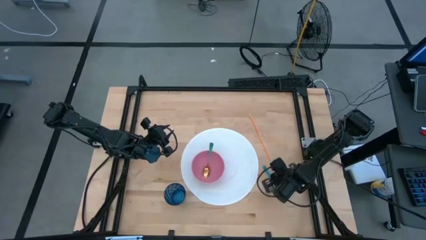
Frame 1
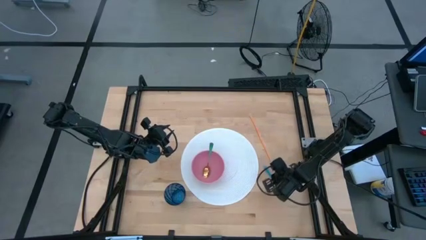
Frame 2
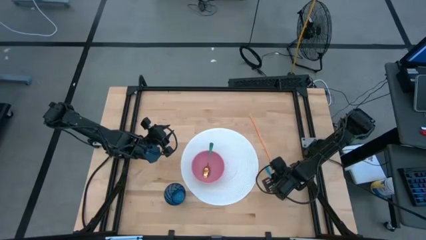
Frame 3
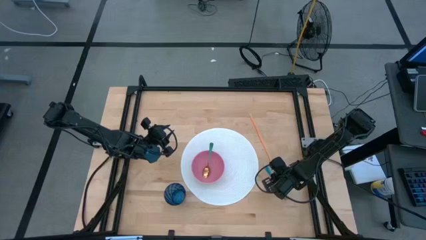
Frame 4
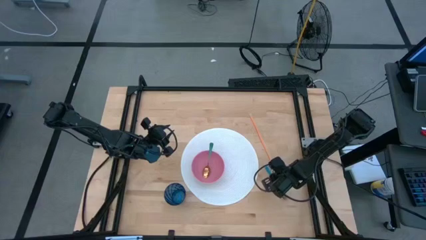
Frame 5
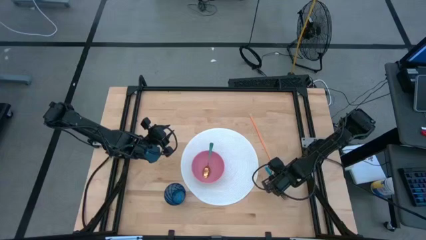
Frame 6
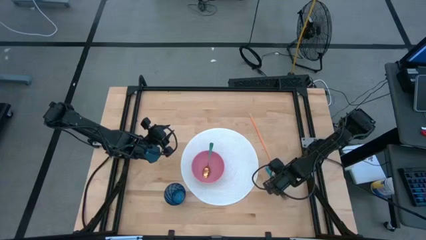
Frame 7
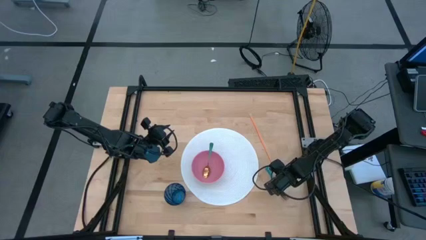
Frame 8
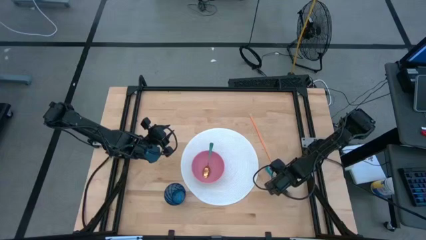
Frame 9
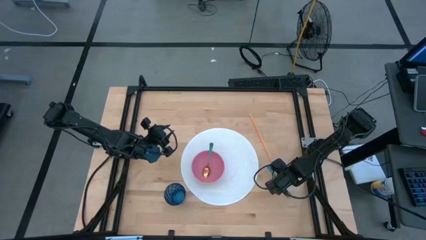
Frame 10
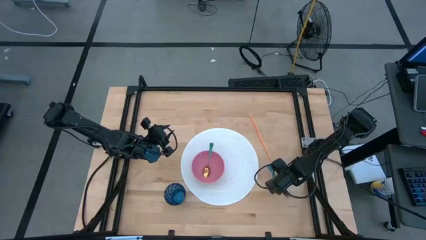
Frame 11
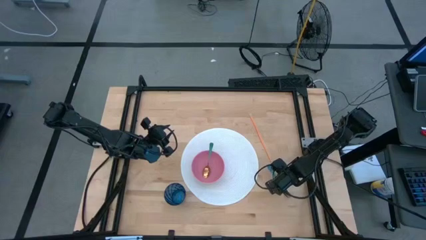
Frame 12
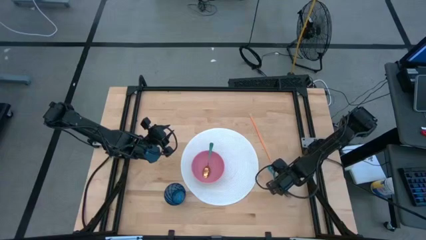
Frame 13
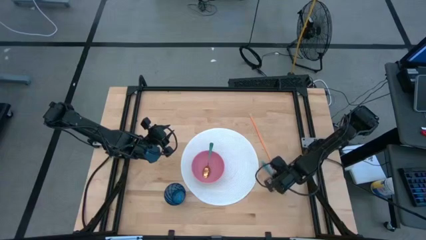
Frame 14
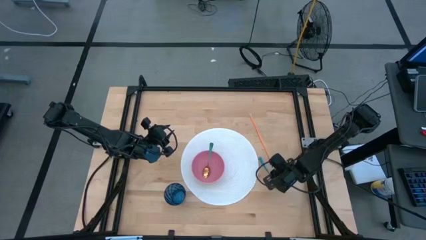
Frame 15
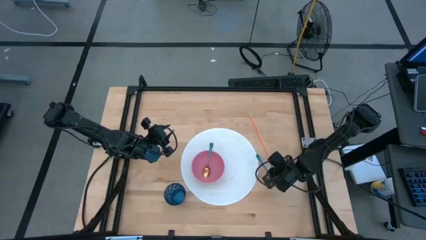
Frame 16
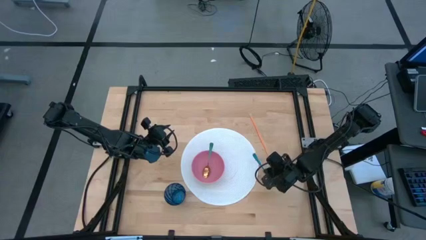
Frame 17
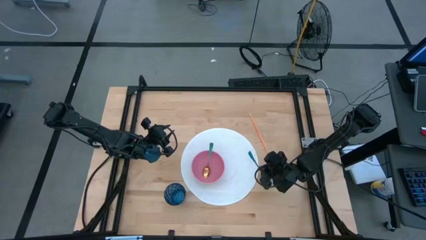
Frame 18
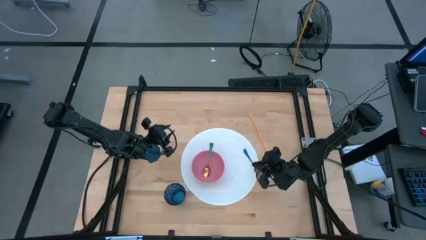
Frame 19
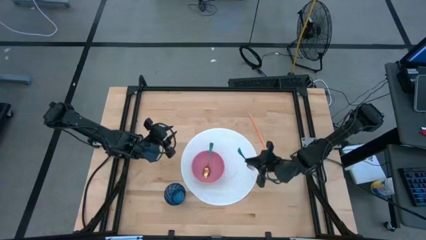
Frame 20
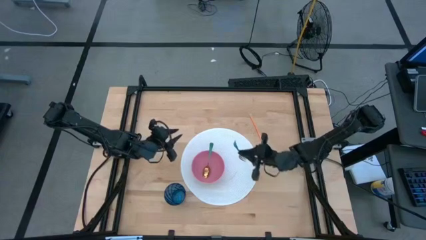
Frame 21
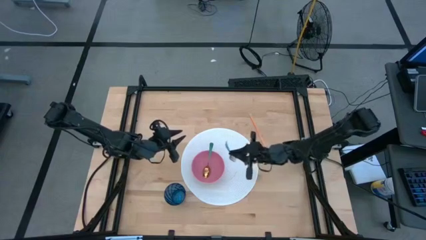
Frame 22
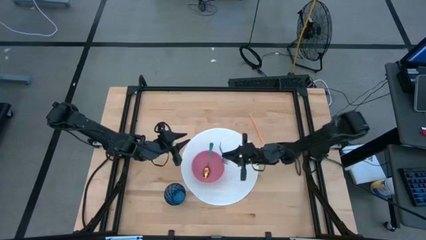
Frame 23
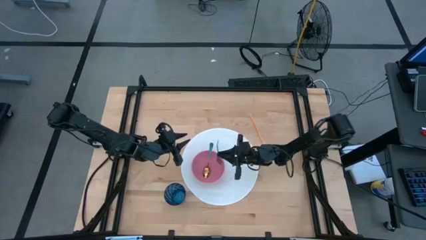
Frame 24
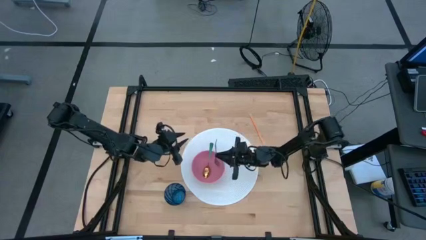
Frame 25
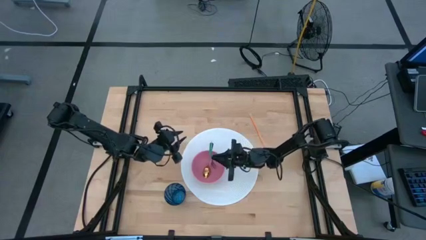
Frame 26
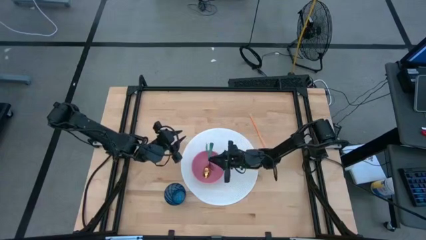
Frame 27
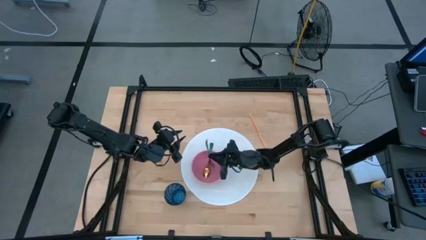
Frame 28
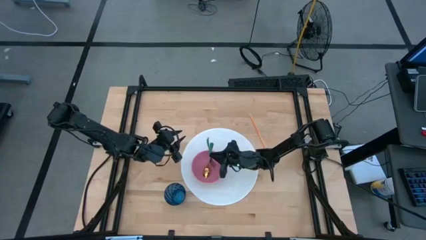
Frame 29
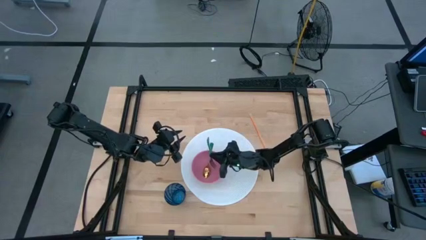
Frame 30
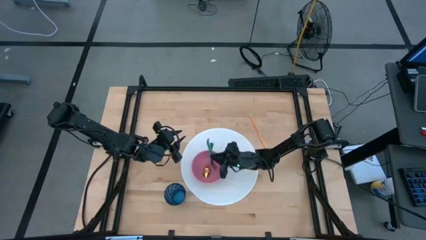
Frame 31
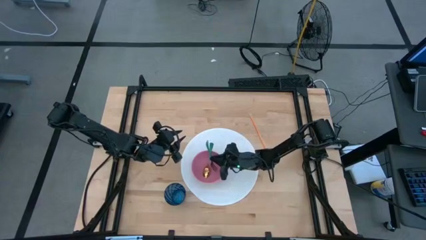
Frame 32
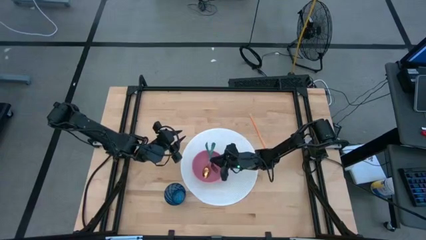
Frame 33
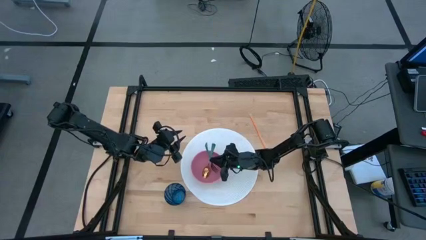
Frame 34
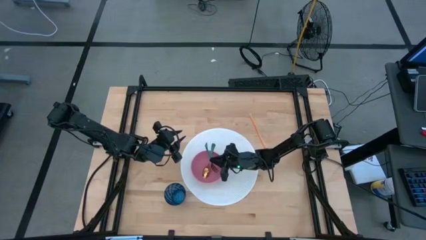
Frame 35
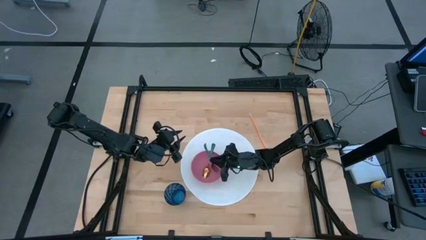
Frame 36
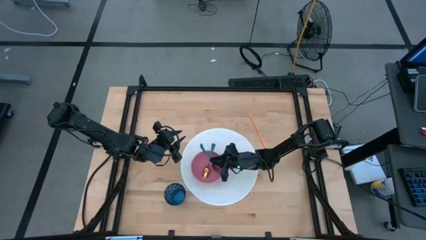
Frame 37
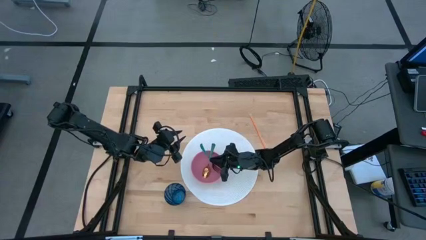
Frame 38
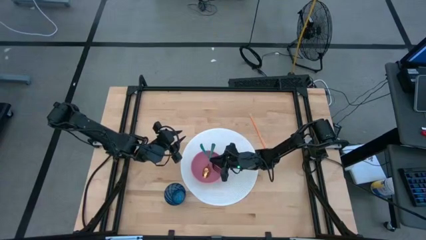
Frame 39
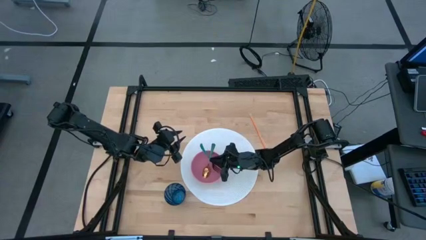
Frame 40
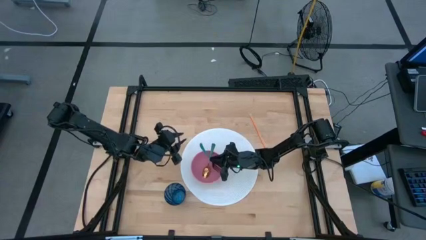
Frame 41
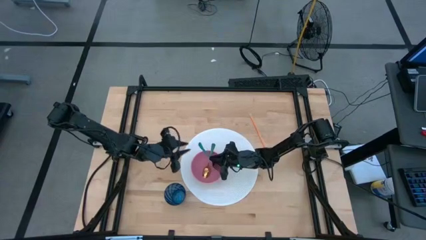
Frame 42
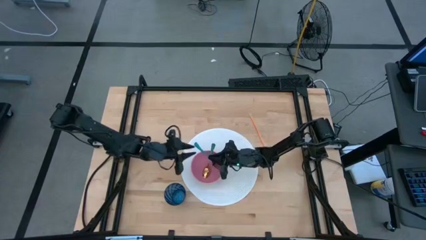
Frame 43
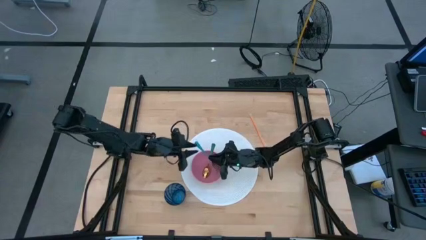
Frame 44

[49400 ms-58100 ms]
Task: Pick & Place Utensil
Put the blue fork into the pink bowl

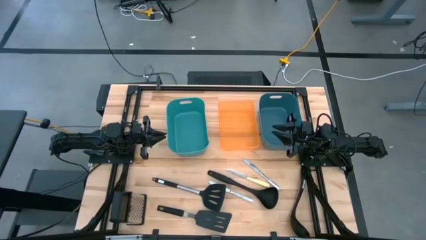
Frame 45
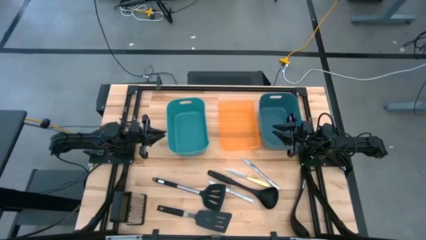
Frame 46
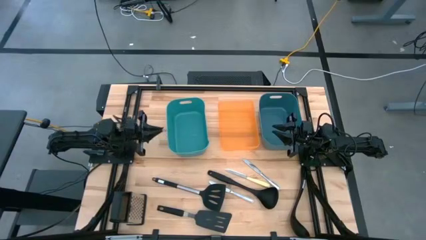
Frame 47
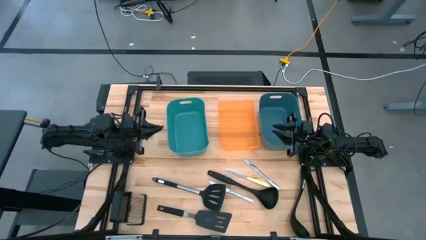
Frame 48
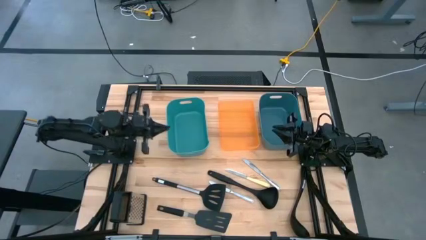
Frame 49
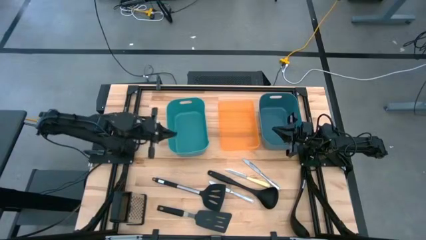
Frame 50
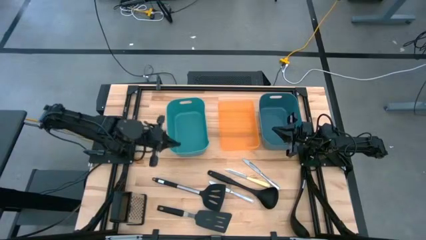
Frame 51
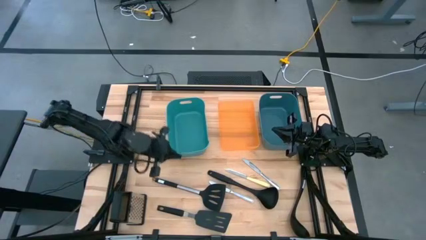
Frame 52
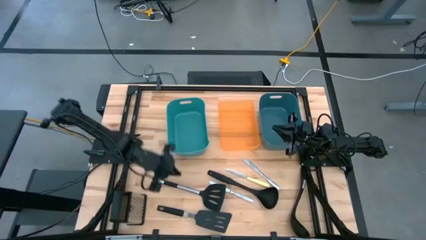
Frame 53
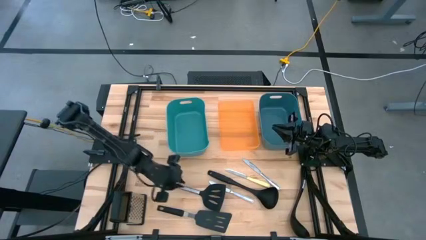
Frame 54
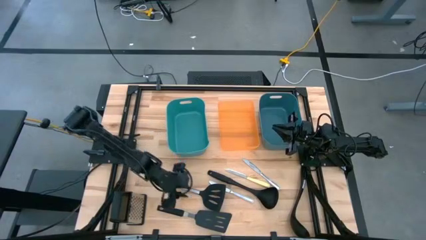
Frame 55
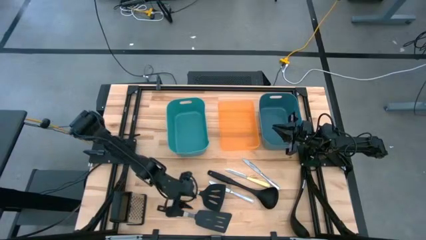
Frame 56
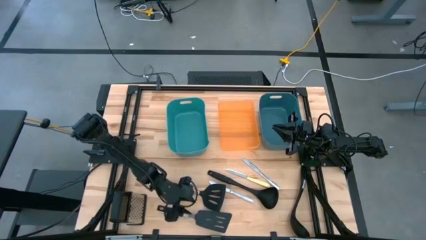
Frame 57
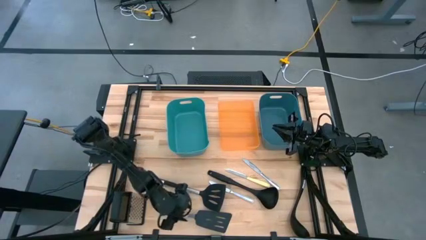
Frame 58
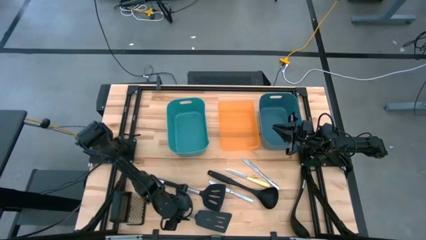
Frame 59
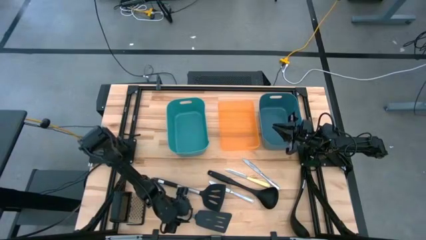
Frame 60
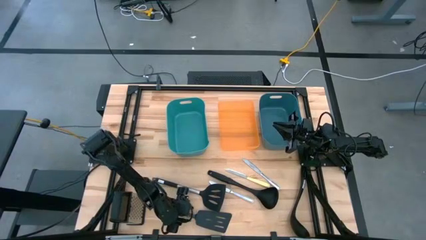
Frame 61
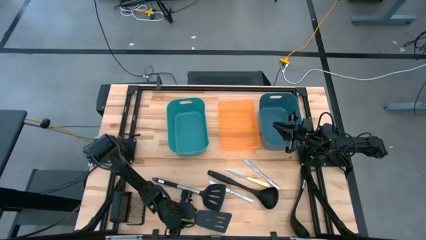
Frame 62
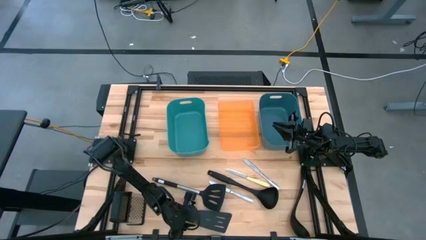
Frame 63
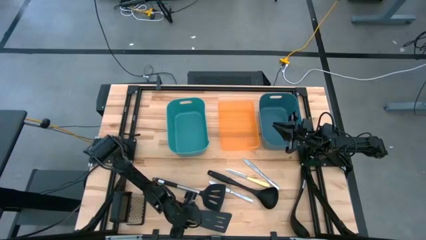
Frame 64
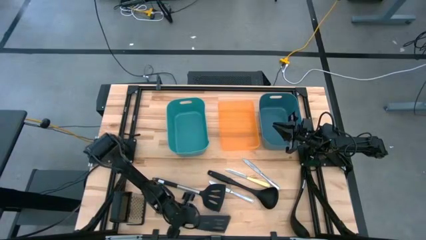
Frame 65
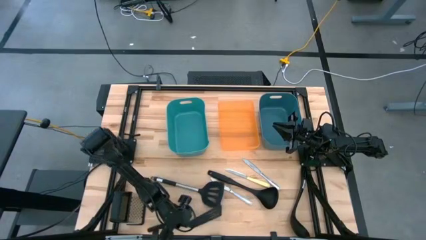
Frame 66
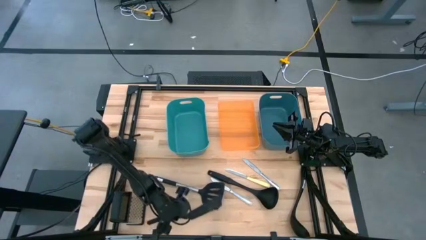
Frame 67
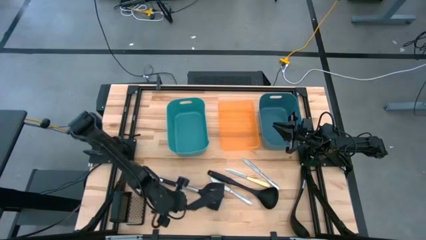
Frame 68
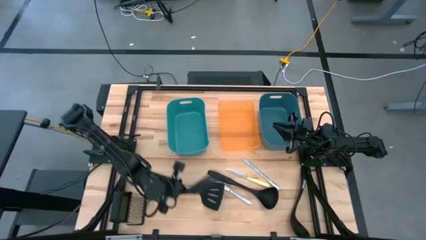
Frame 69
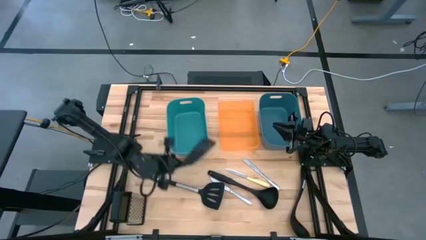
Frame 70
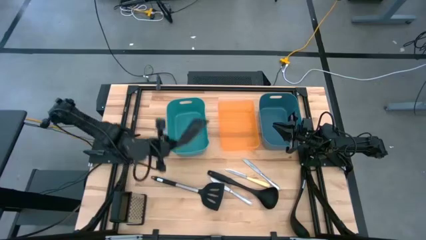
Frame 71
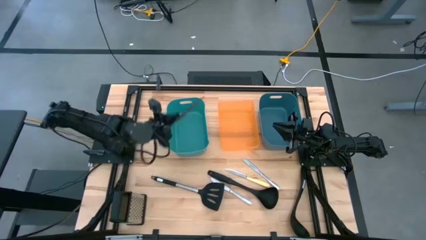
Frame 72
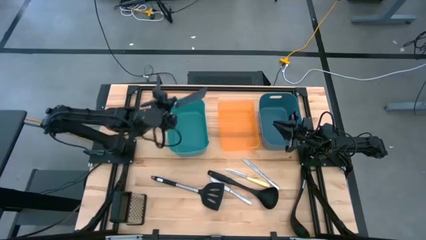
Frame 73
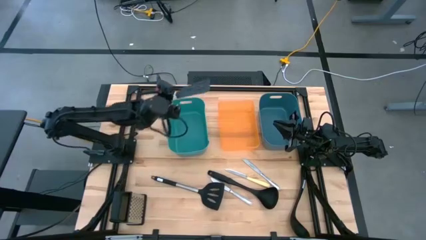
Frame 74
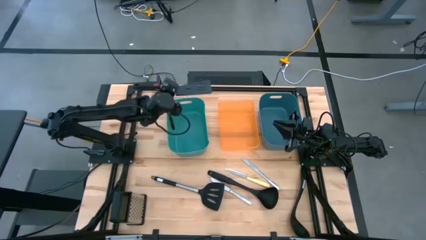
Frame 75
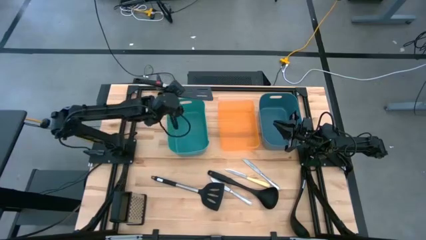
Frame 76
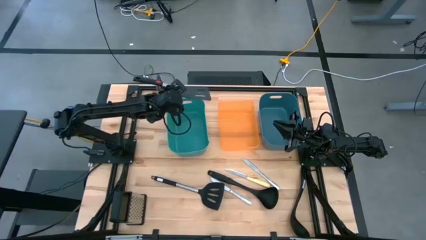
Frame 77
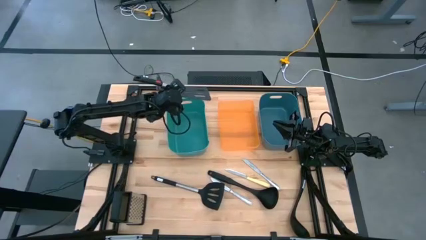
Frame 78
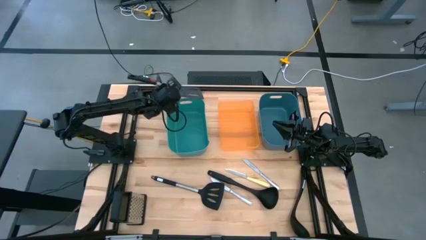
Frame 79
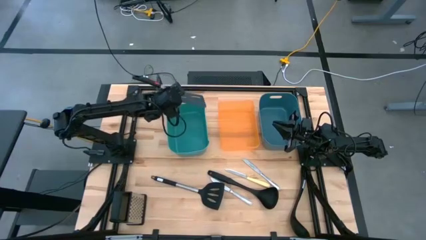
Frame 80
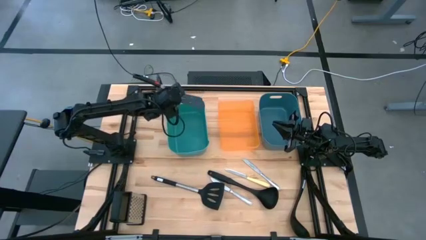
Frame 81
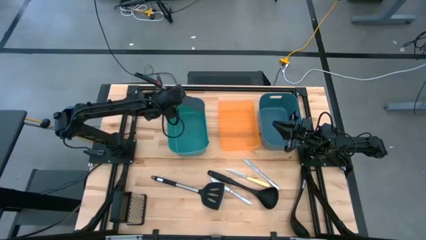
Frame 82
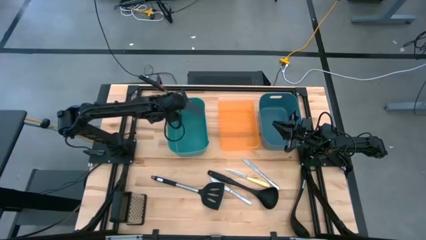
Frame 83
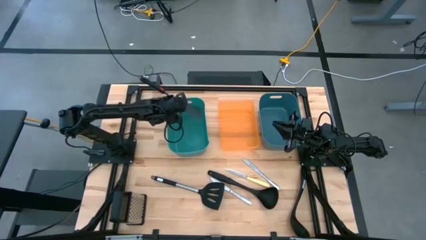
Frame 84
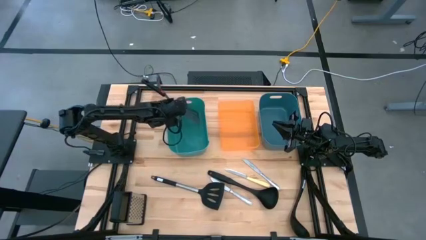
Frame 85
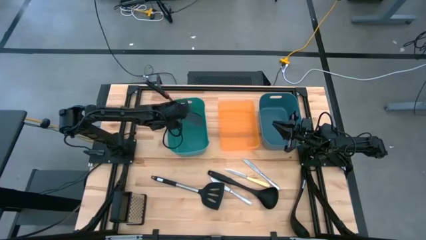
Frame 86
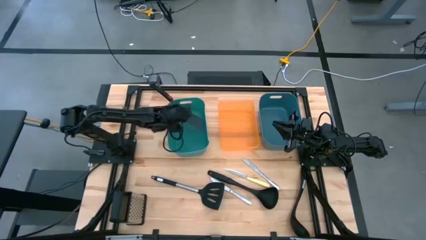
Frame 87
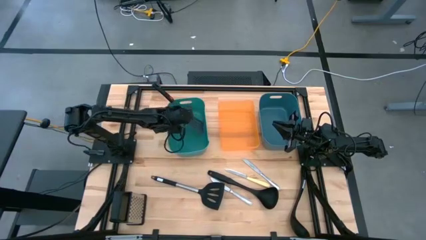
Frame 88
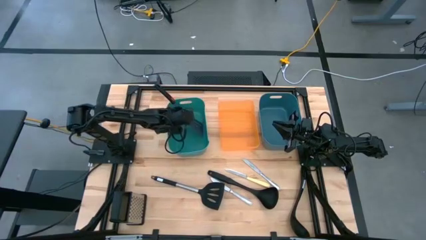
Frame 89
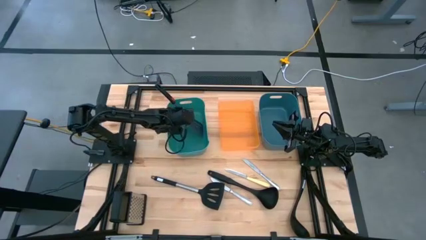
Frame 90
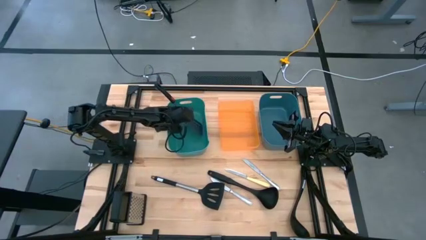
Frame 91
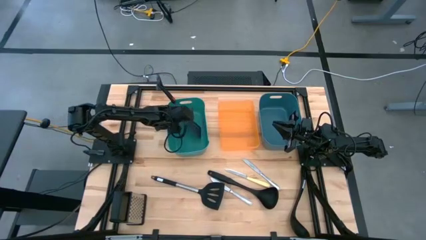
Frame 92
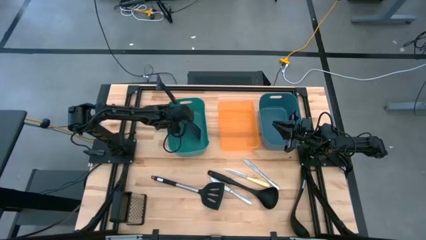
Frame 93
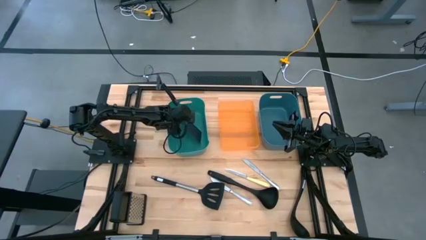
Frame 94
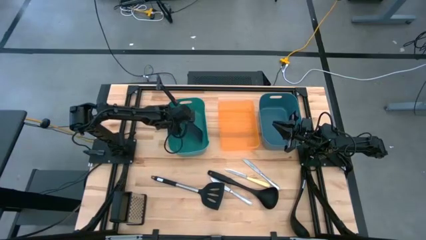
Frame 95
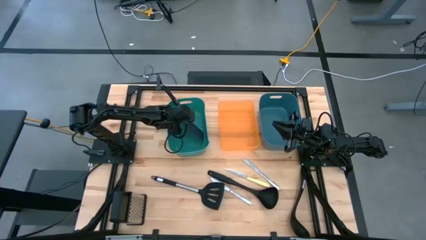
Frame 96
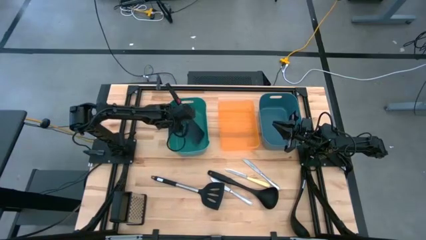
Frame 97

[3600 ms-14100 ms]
Task: Pick & Place Kitchen Items
Put the bottom black spatula into the green bin
